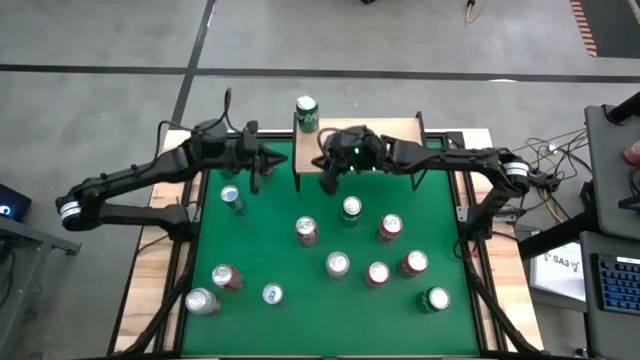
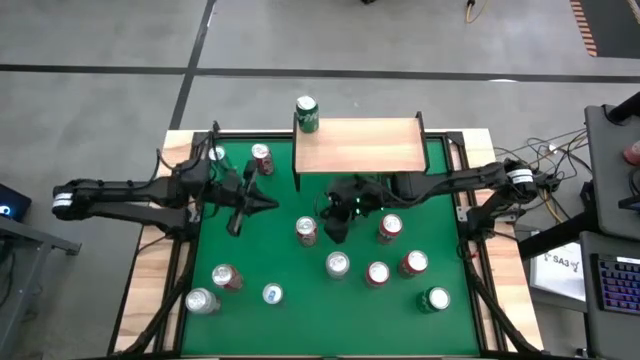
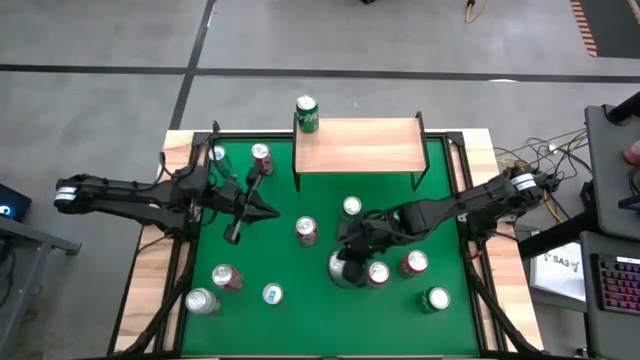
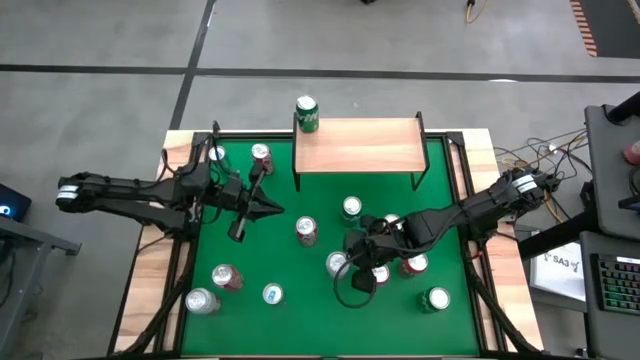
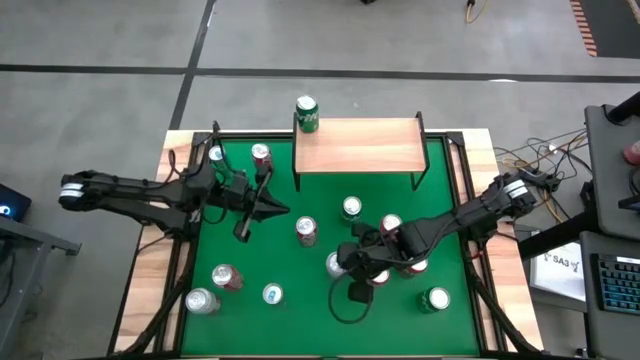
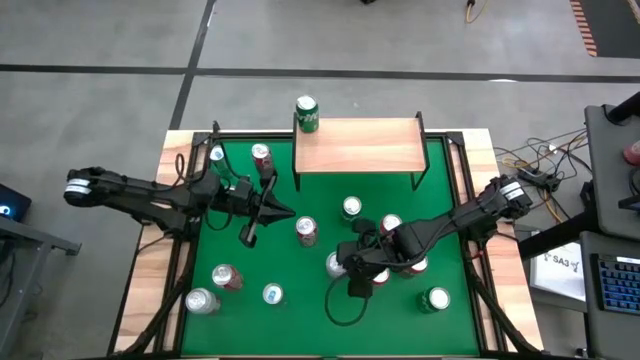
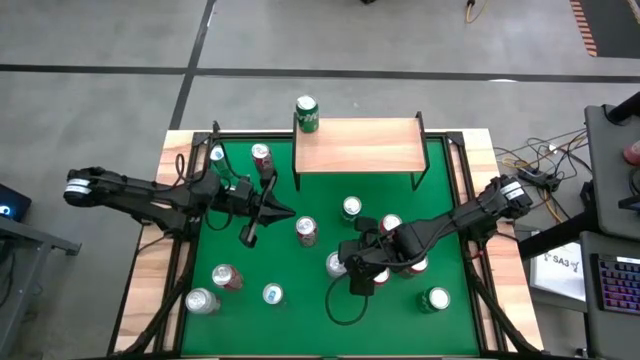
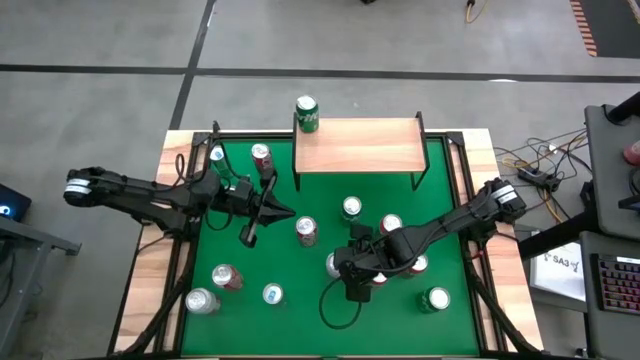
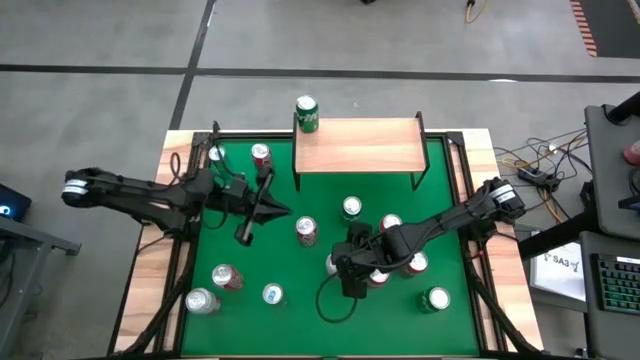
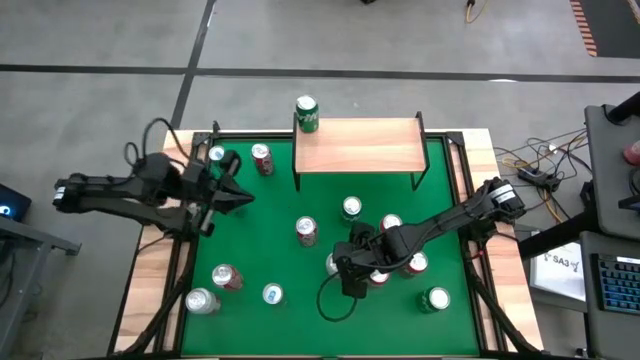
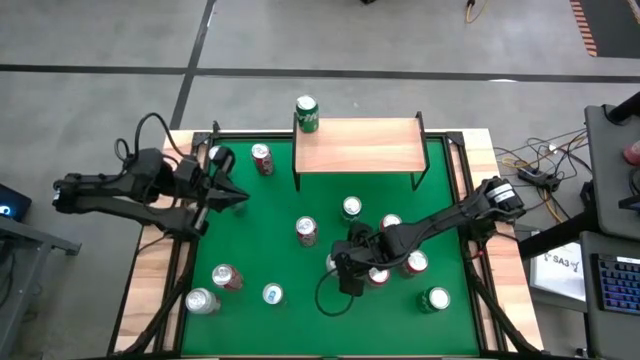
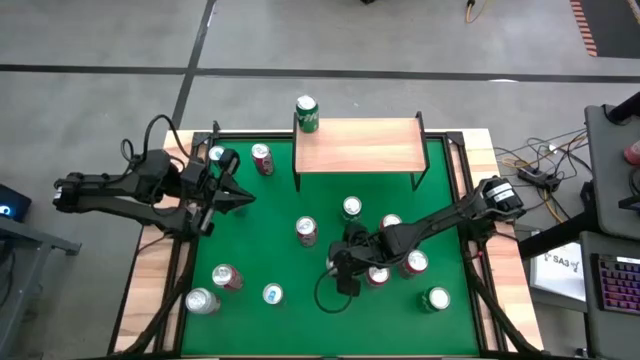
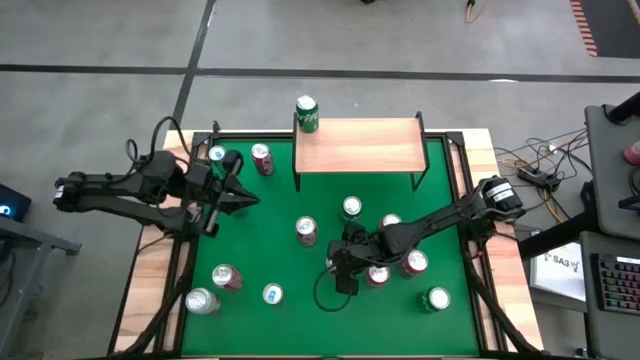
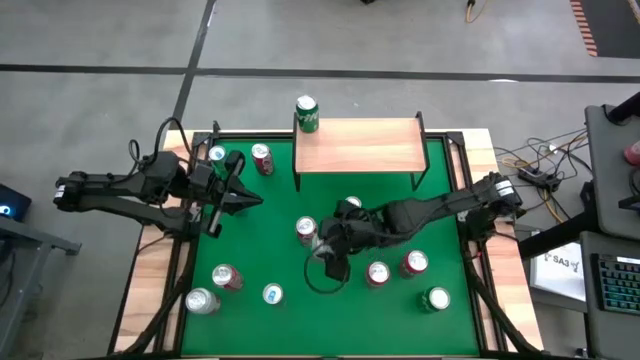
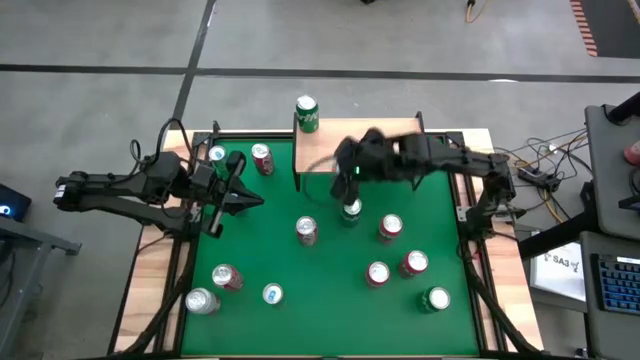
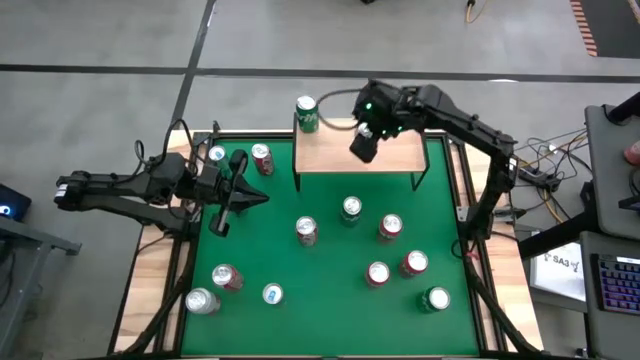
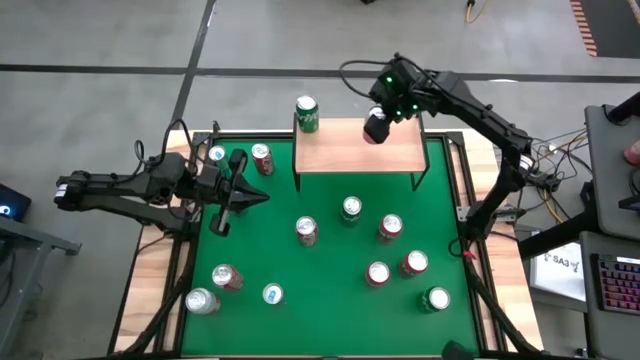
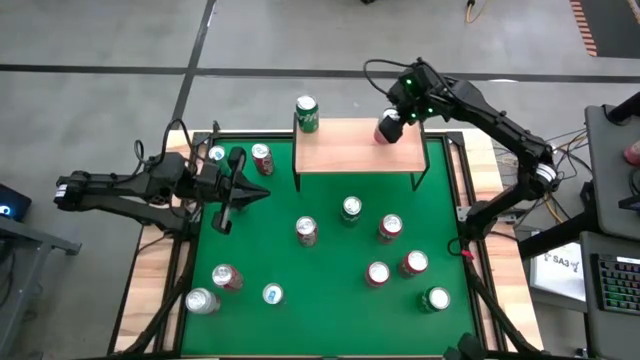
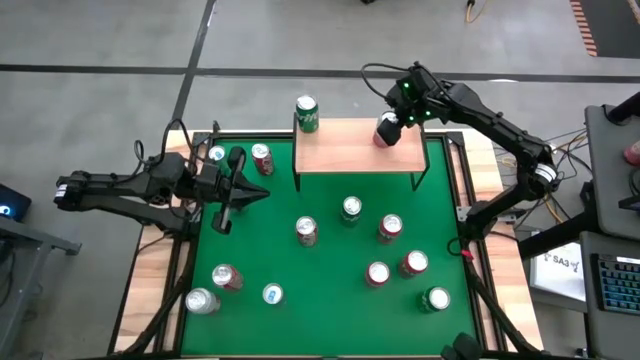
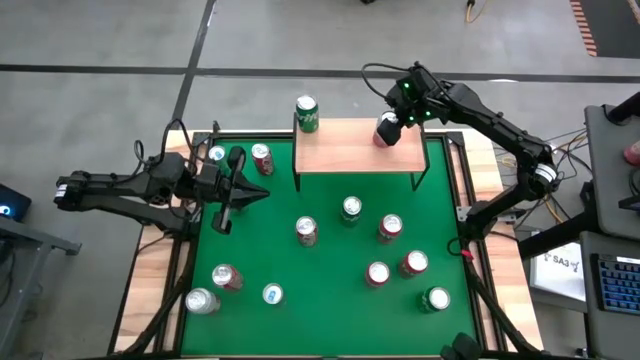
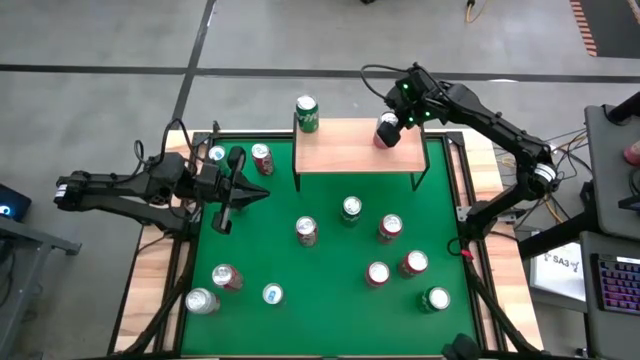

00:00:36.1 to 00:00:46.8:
Task: Place canned beverage on shelf
Put the top pink white soda can on the shelf

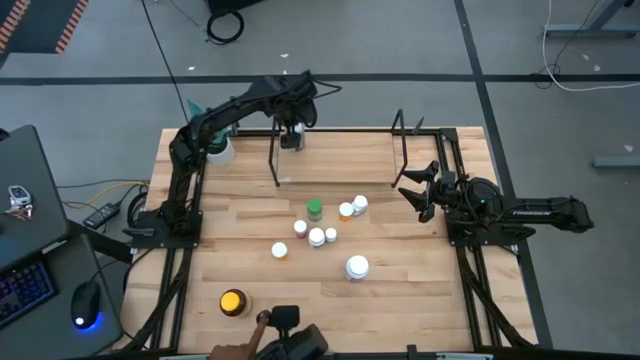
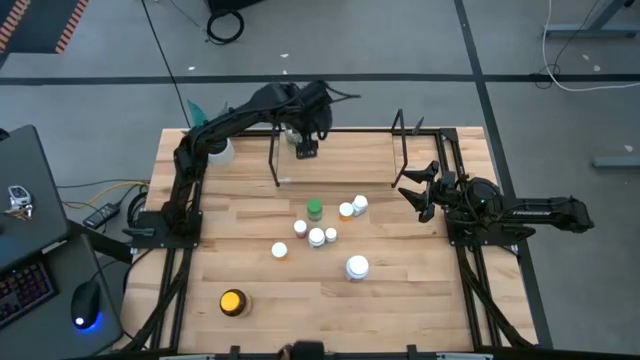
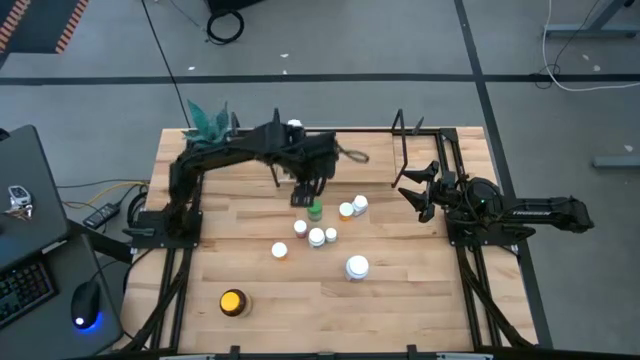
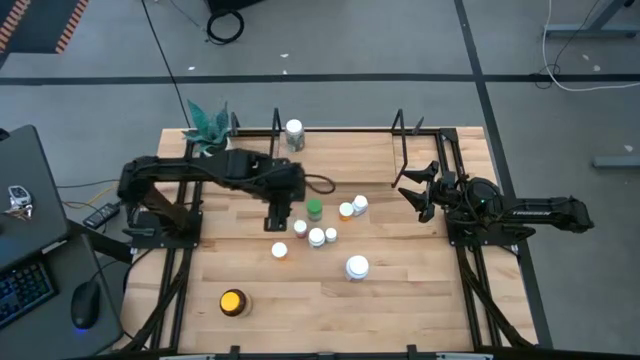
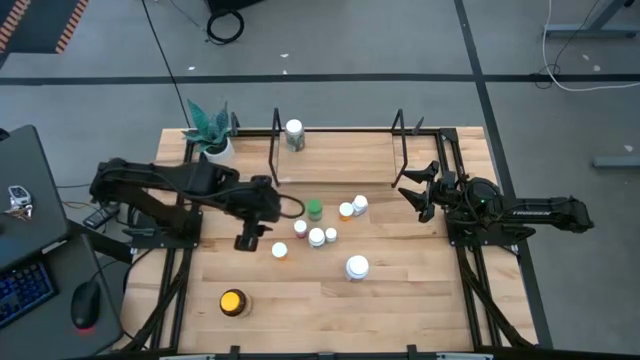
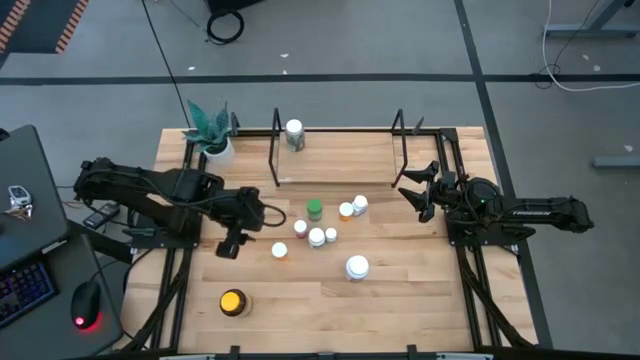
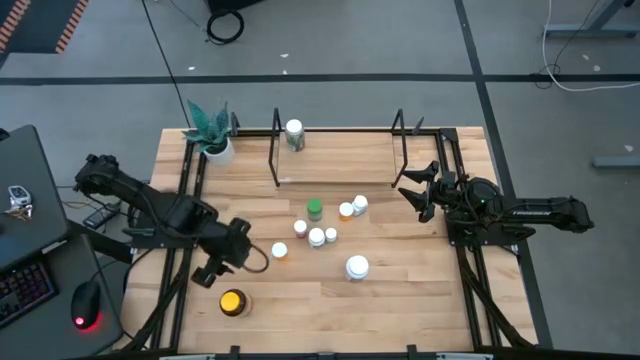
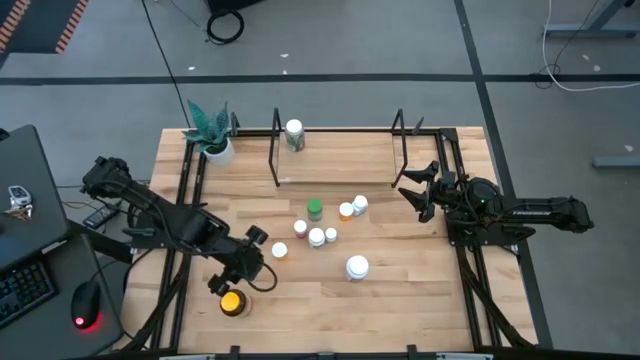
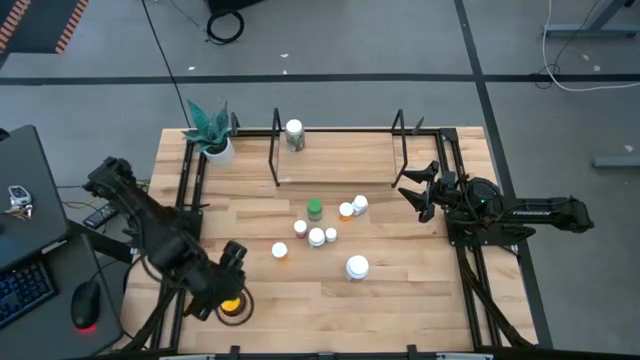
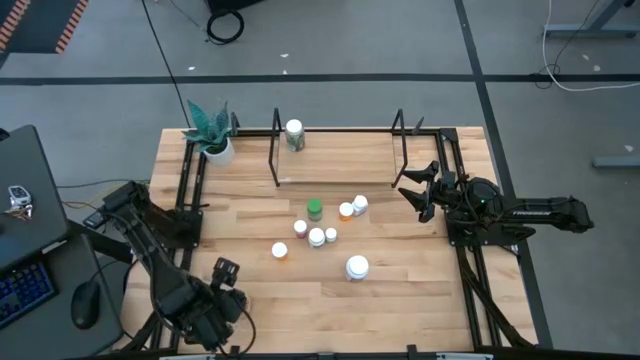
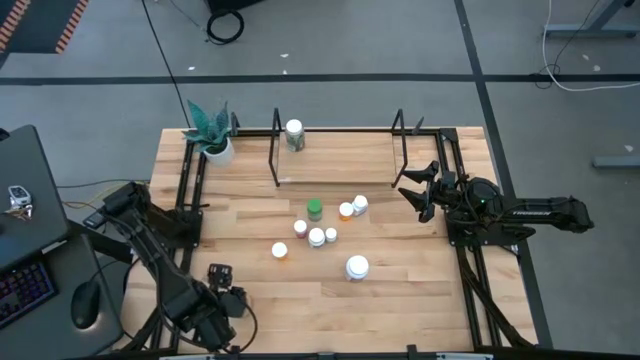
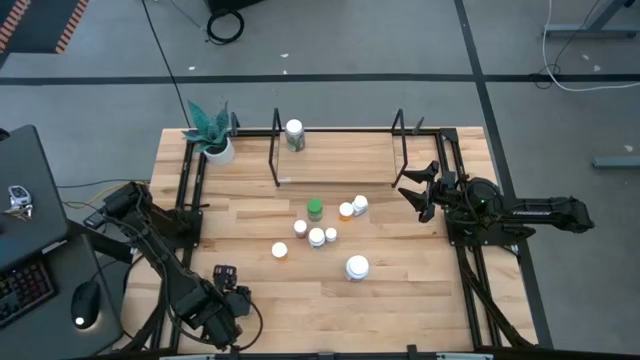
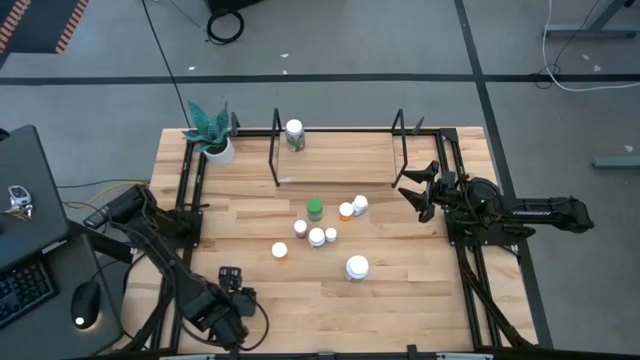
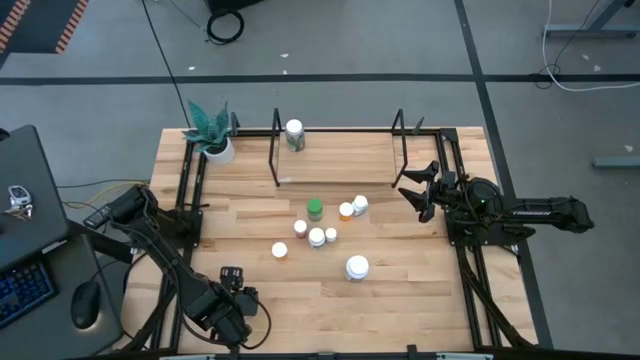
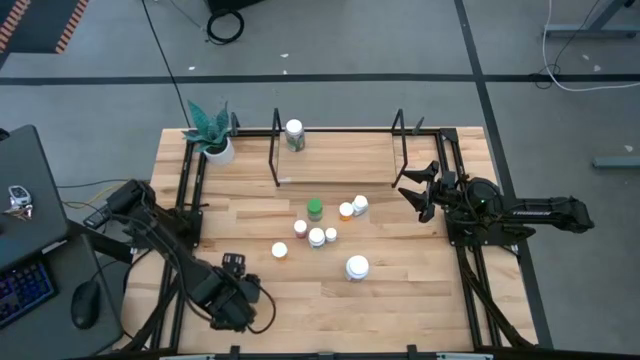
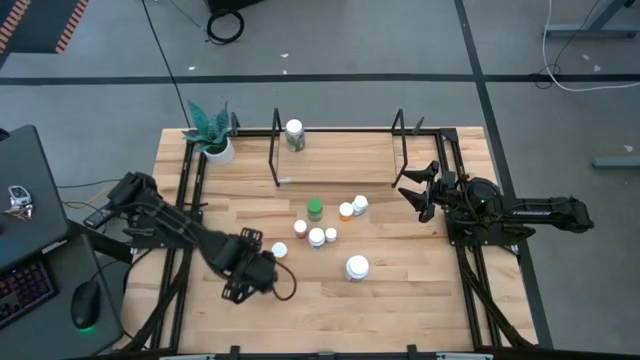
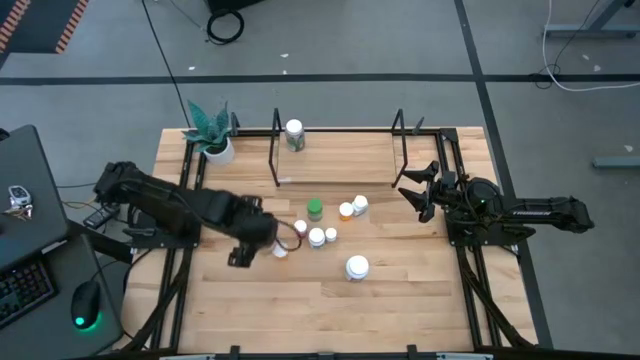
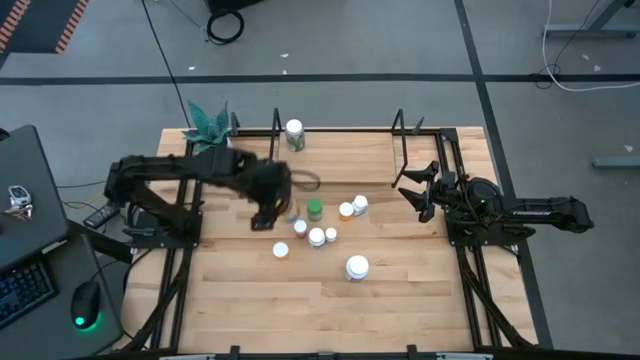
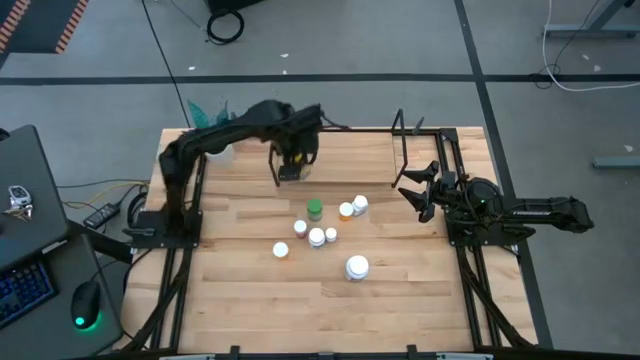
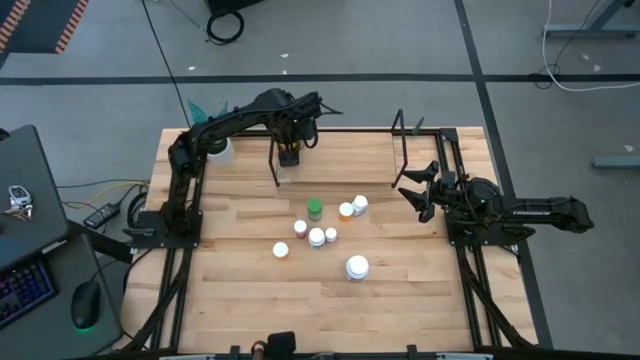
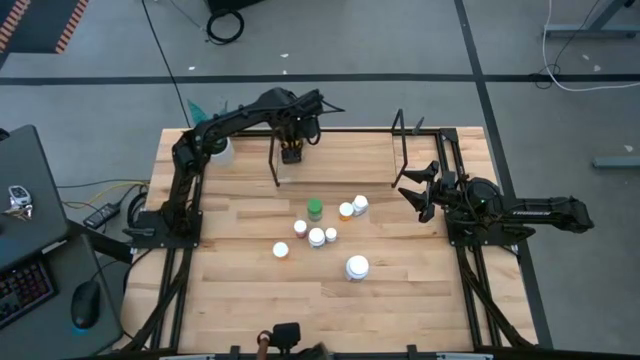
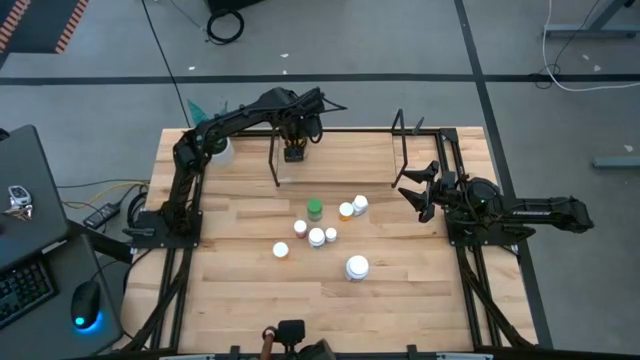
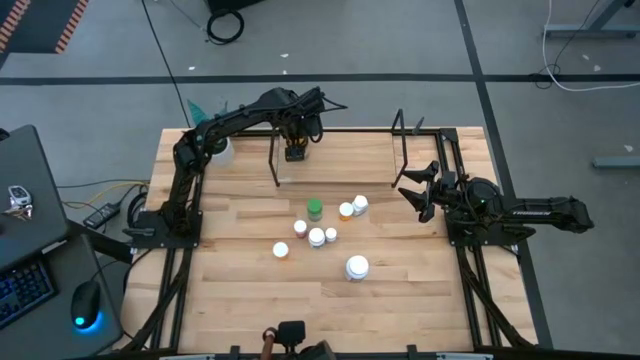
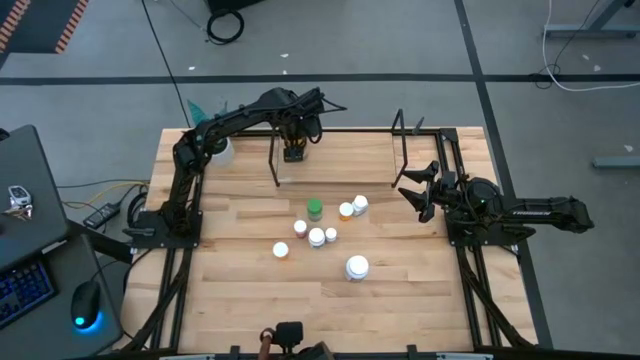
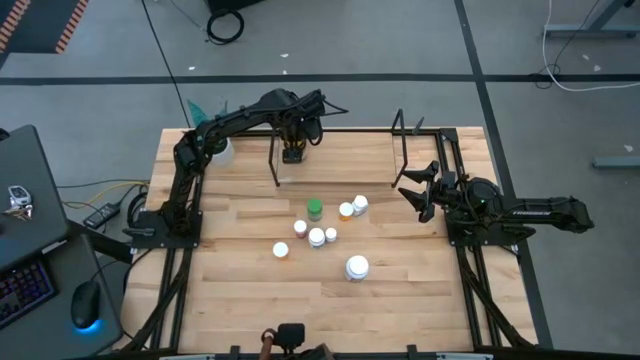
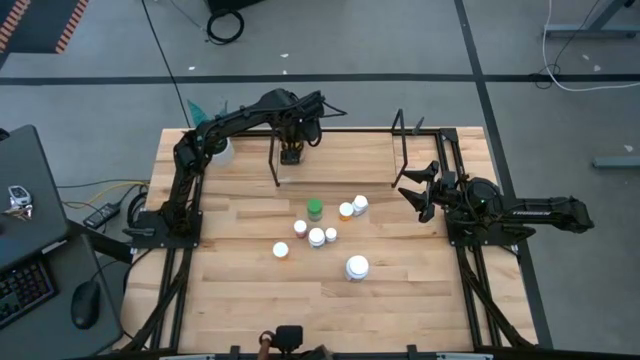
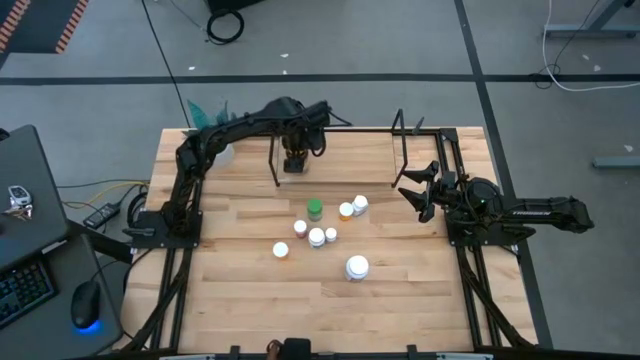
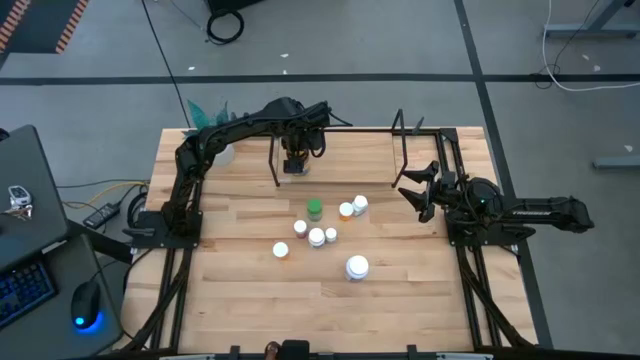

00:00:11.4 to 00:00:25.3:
Task: Pick and place medicine bottles onto shelf by color
Put the yellow medicine bottle on the shelf
